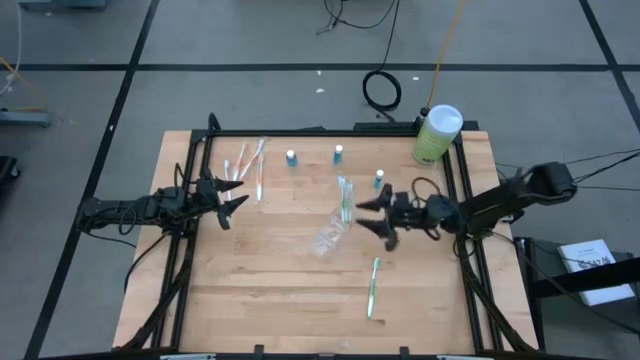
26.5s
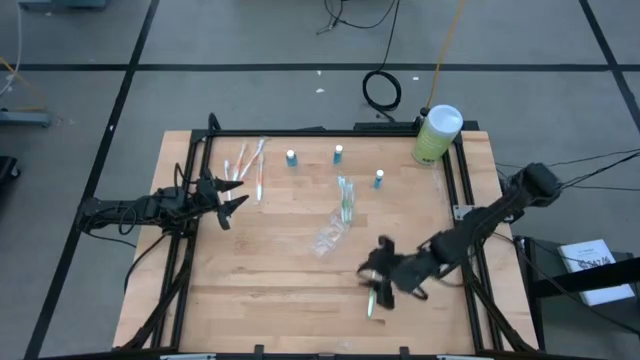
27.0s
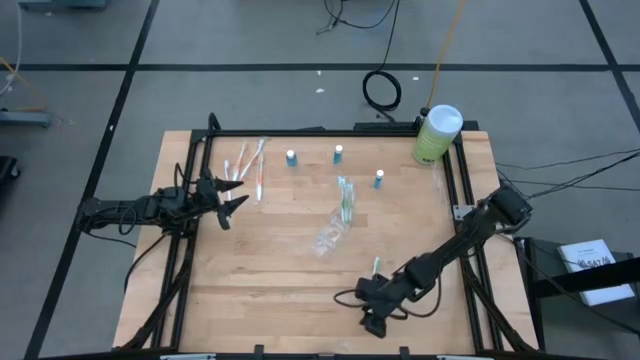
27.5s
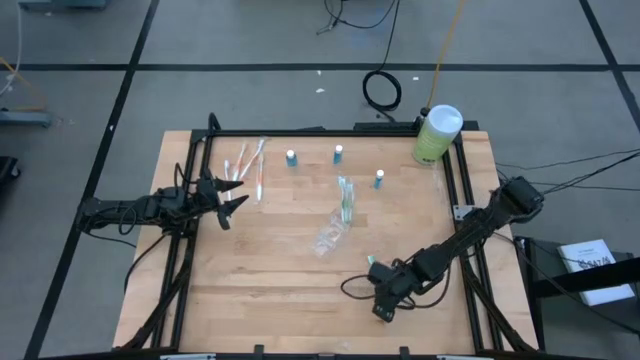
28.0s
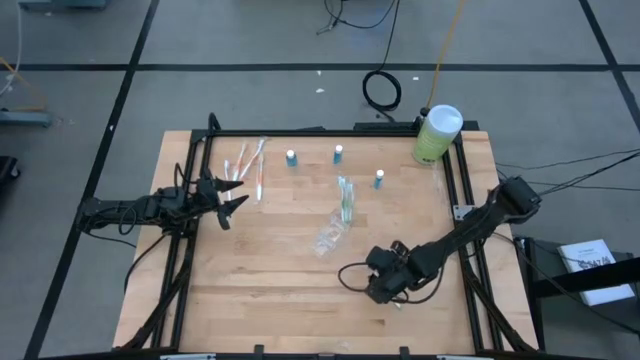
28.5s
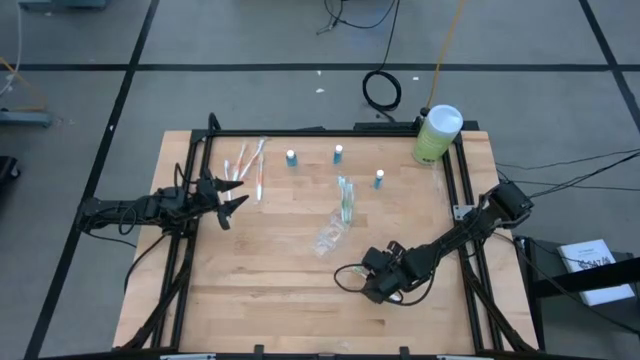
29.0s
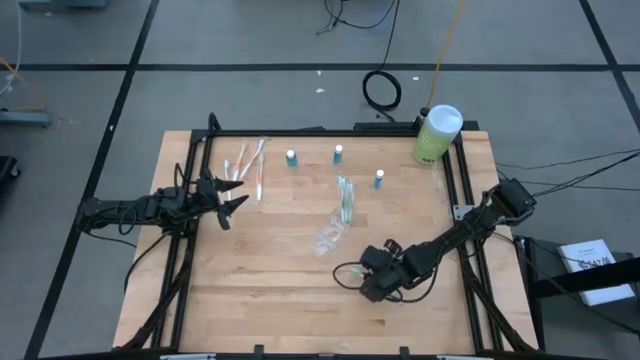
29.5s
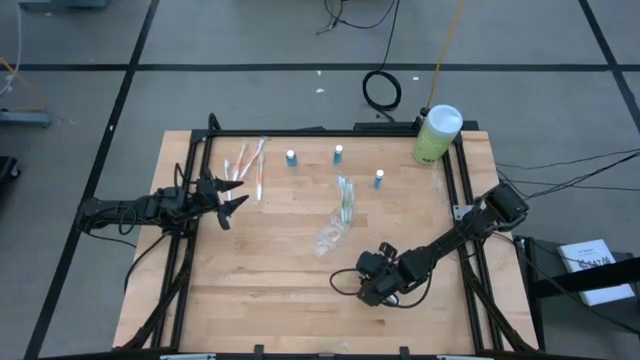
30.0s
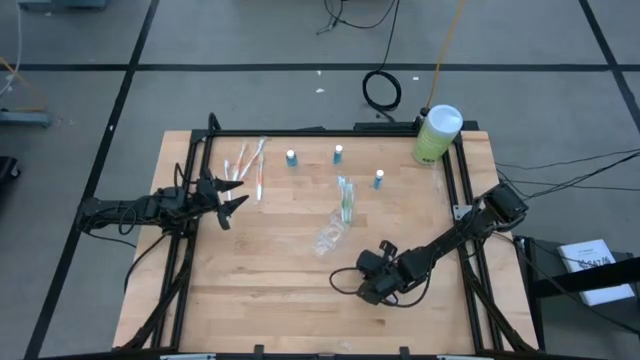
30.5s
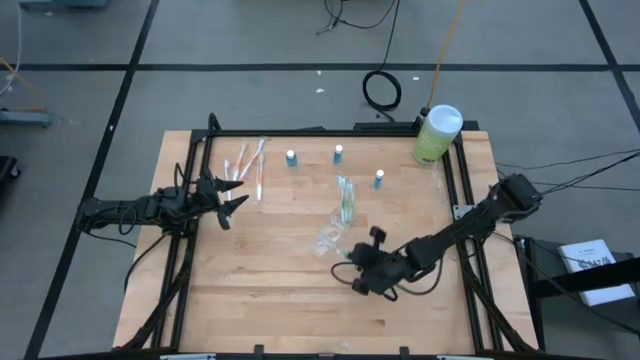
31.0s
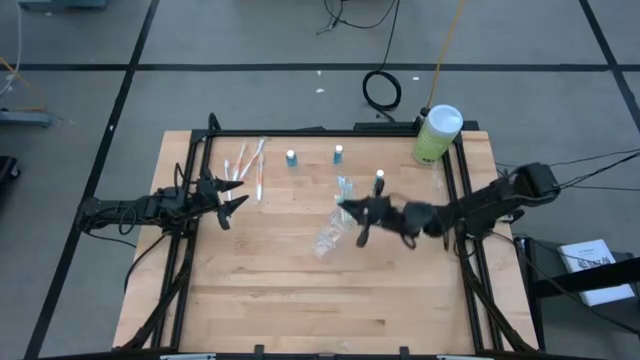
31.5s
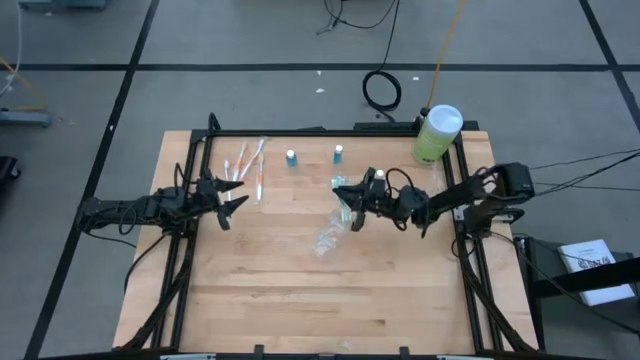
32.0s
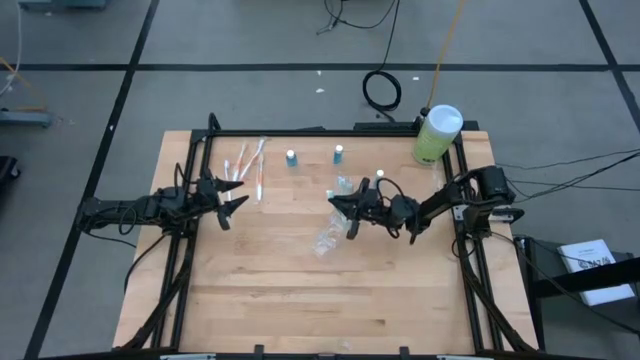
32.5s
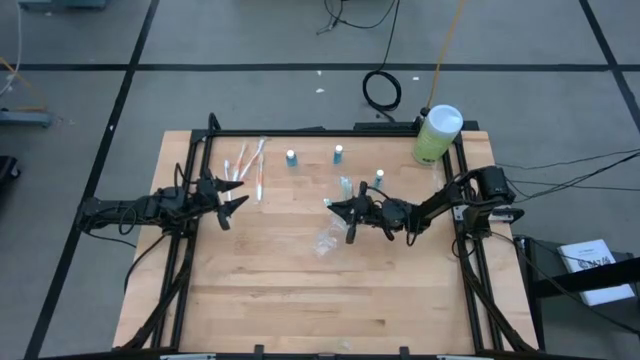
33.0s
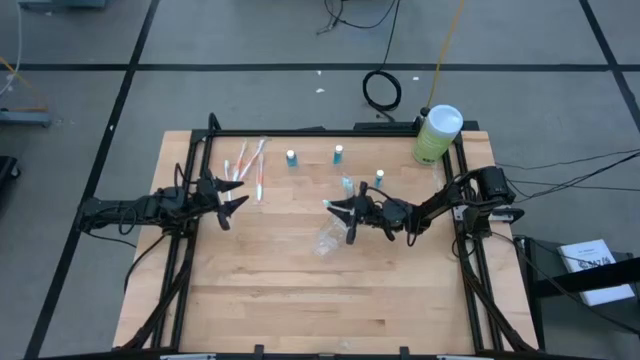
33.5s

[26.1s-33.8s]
Task: Pick & Place toothbrushing station
Put the green toothbrush into the transparent organizer

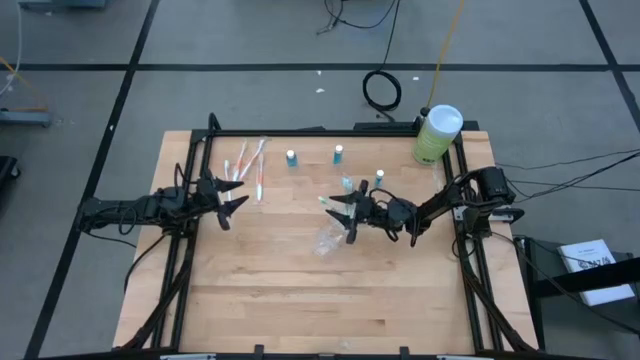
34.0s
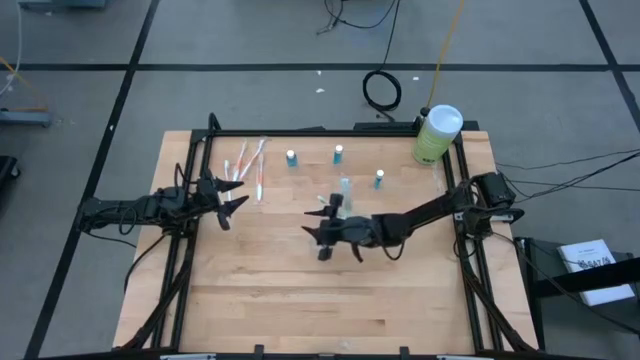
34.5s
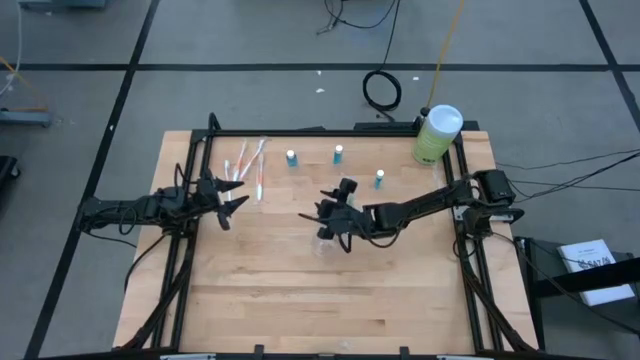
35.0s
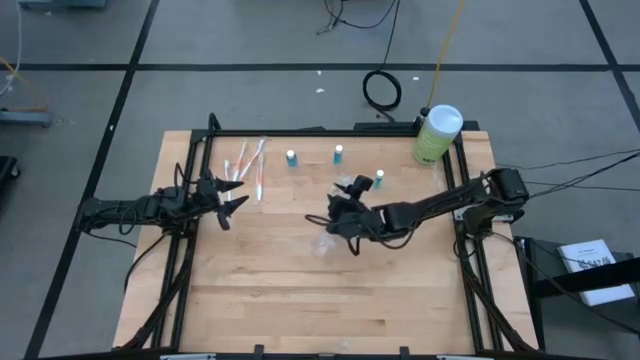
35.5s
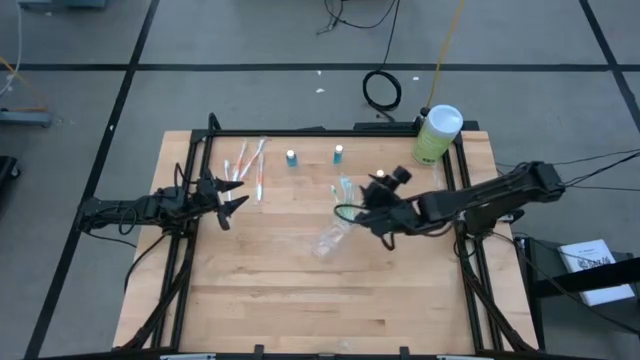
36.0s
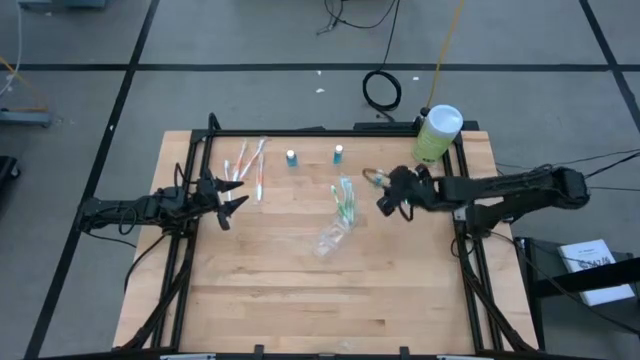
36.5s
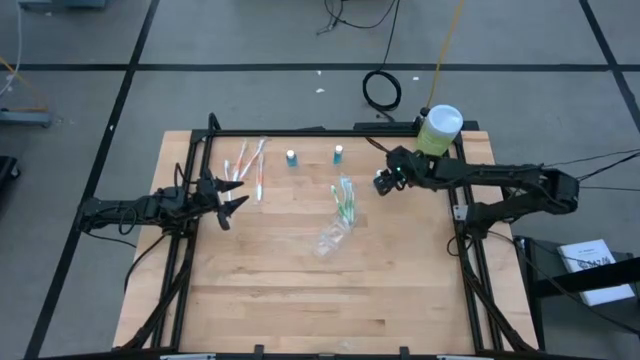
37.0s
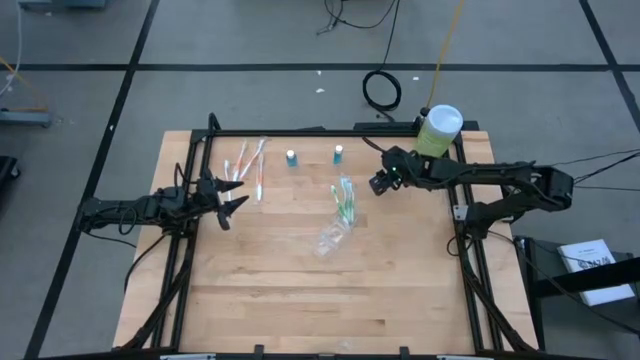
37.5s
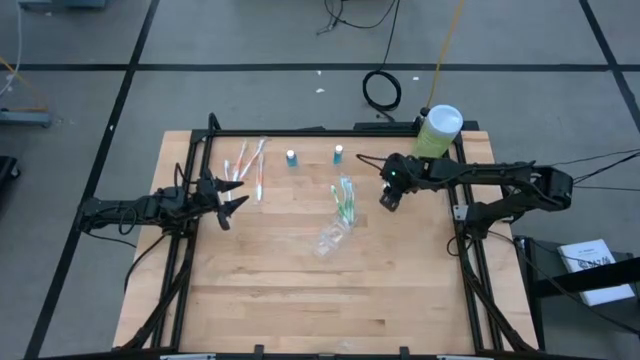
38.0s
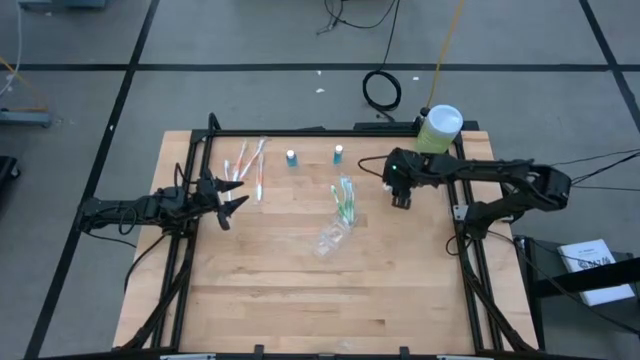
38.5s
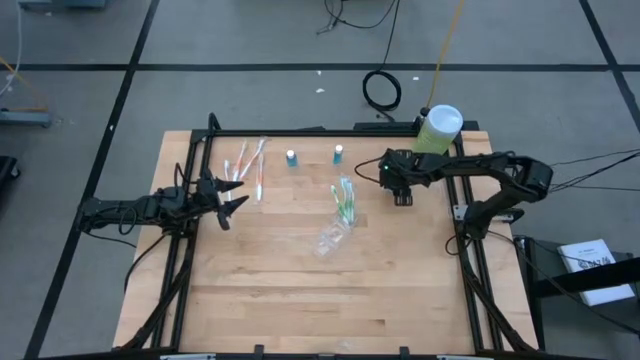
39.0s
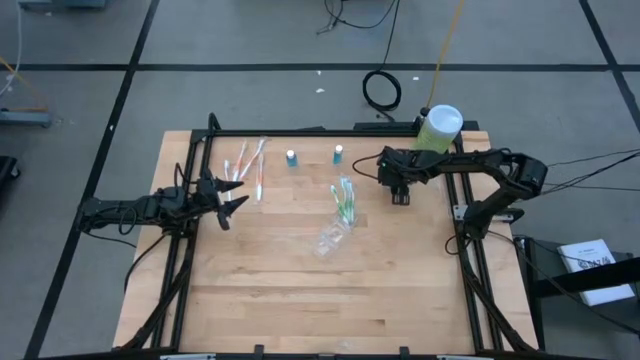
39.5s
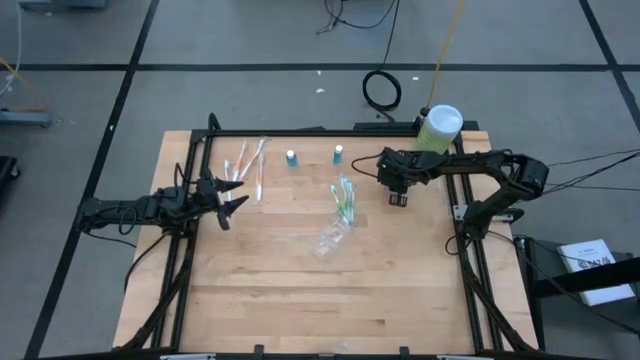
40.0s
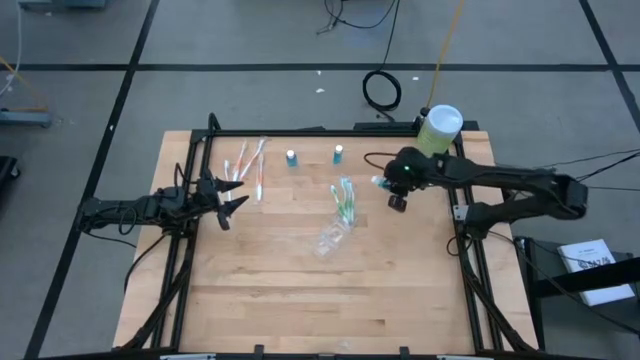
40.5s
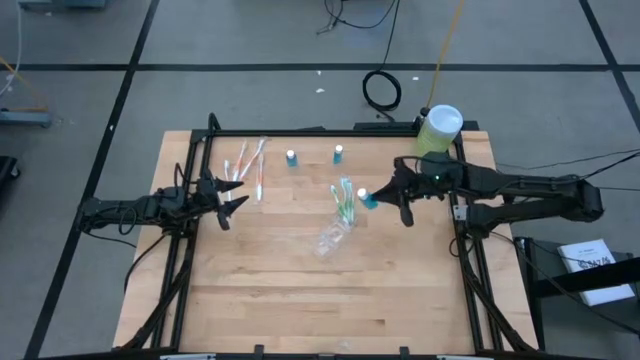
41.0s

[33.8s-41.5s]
Put the mouthwash bottle into the transparent organizer

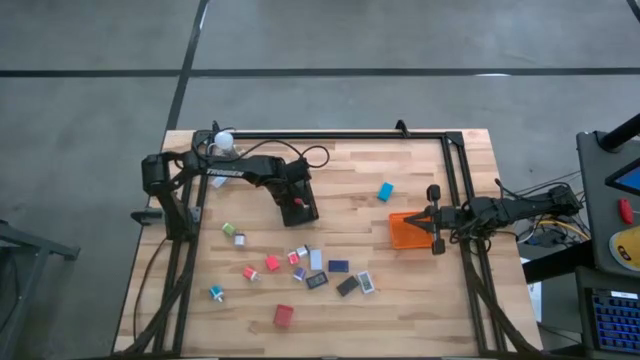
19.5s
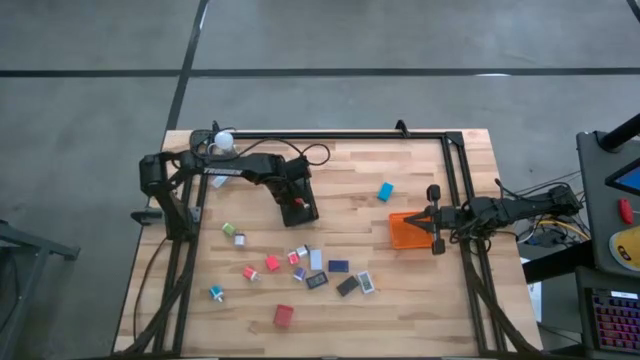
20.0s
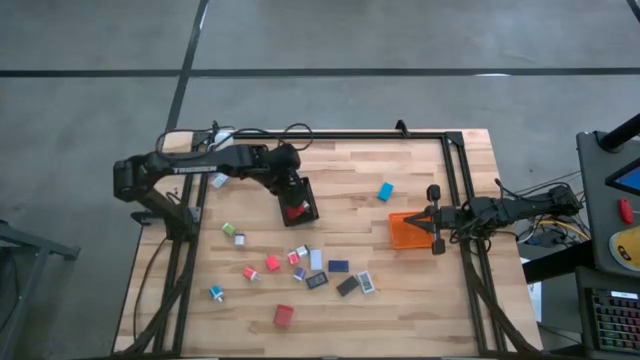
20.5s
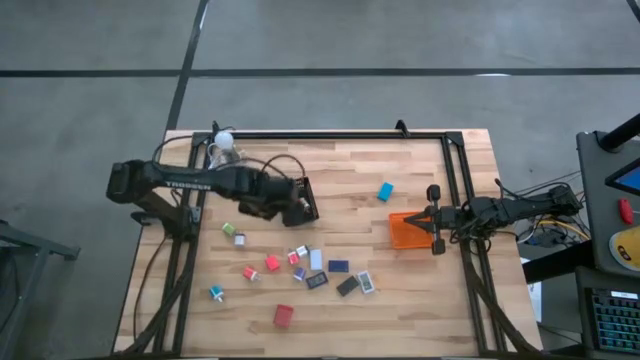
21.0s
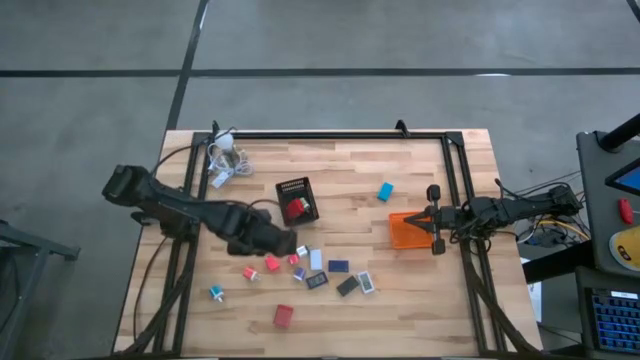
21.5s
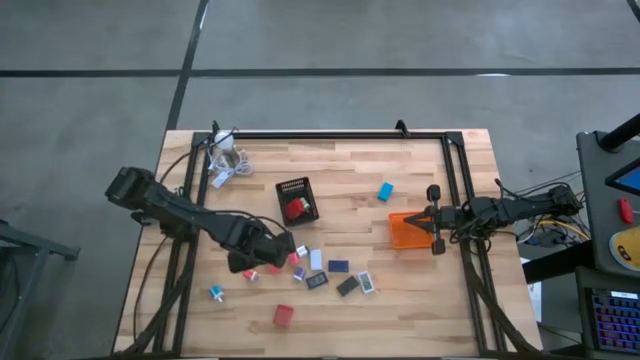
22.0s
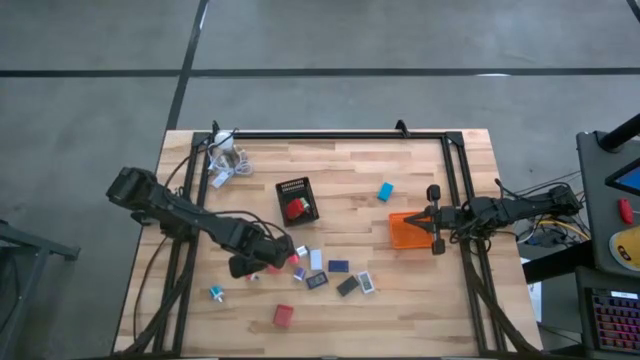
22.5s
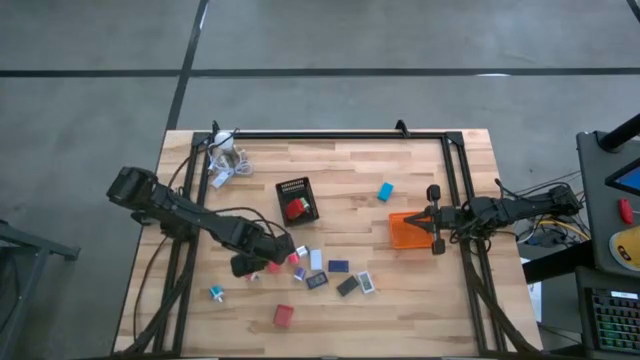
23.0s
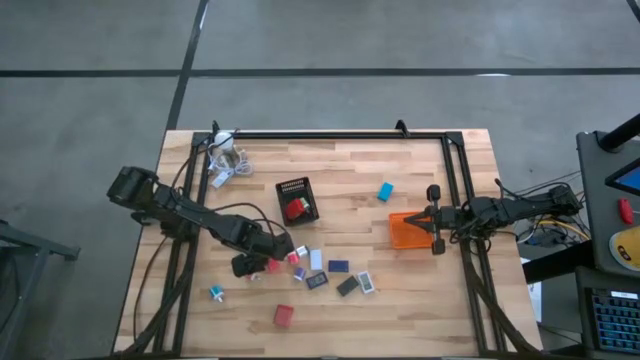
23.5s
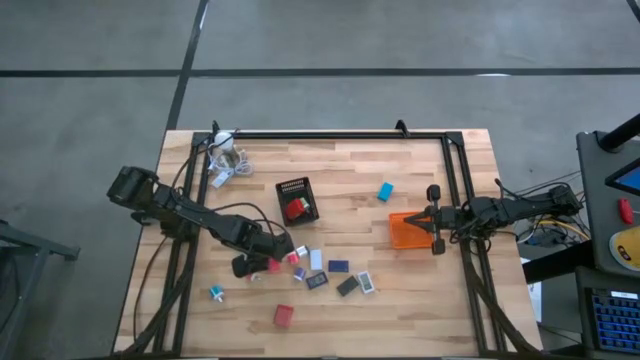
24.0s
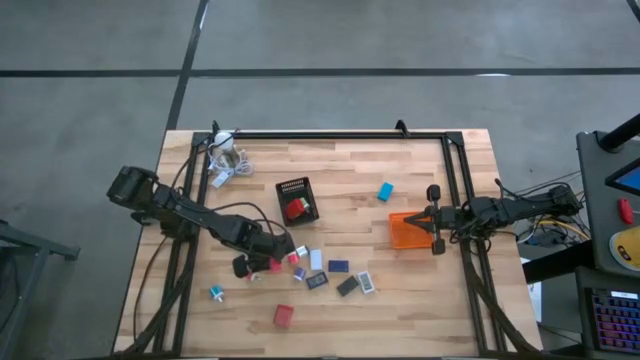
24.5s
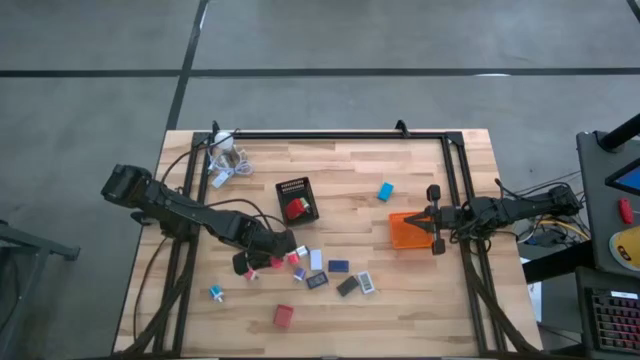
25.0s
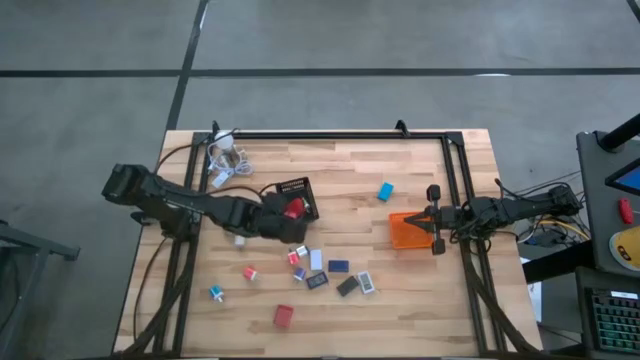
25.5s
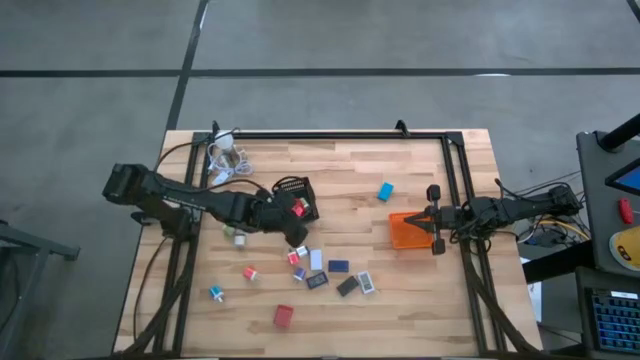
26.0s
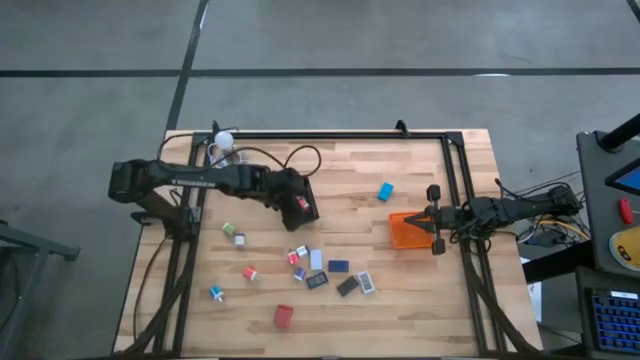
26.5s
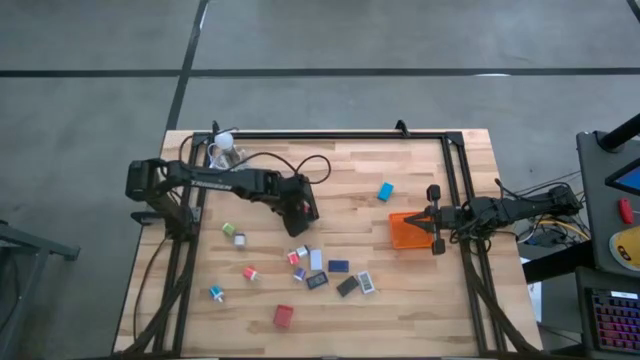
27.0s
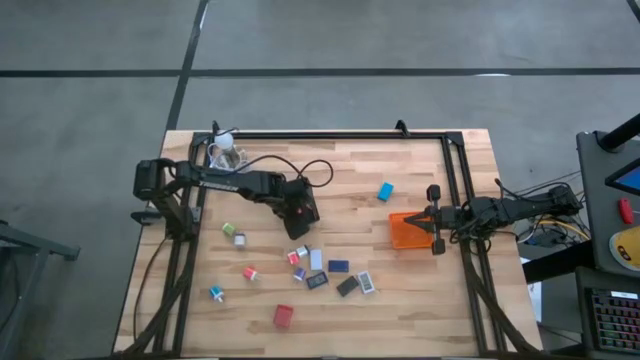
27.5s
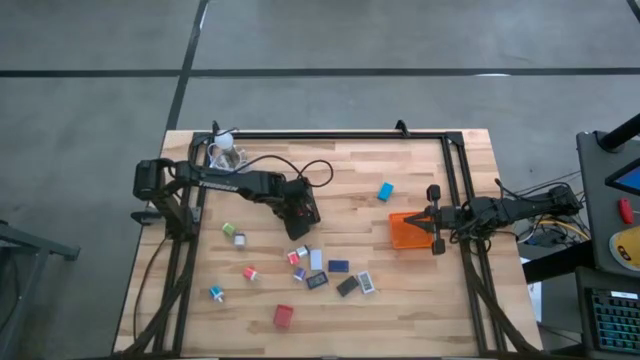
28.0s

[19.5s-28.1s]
Task: Pick & Place Office items
Put the middle pink charger adapter in the black bin
